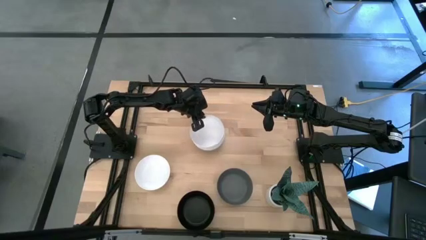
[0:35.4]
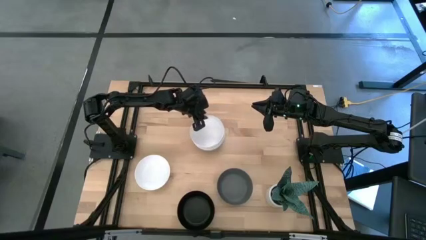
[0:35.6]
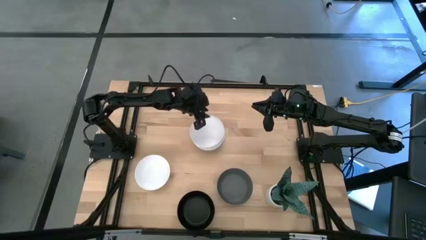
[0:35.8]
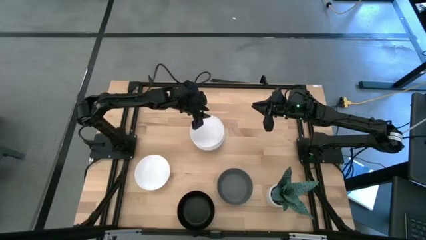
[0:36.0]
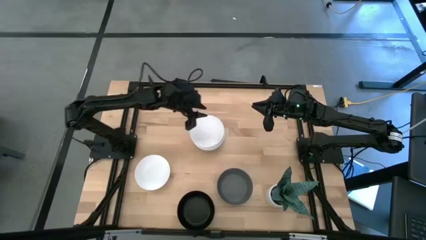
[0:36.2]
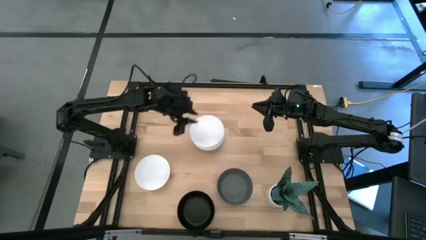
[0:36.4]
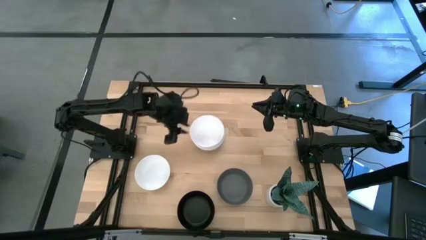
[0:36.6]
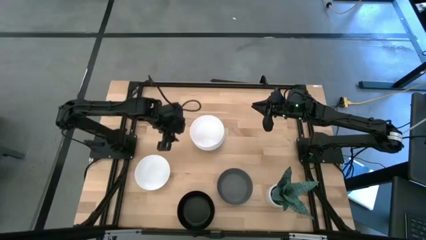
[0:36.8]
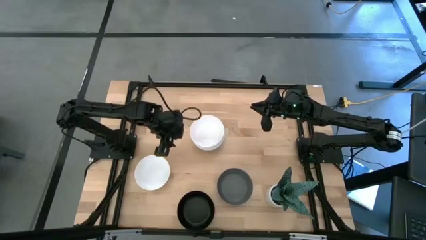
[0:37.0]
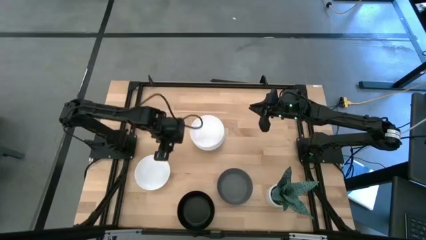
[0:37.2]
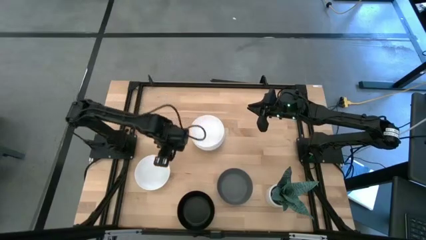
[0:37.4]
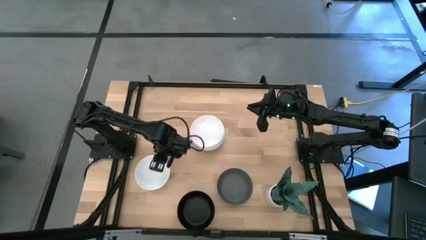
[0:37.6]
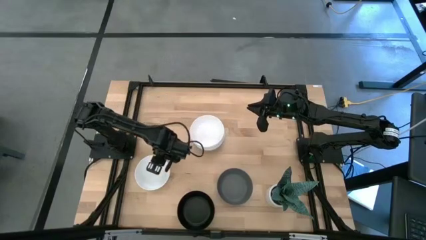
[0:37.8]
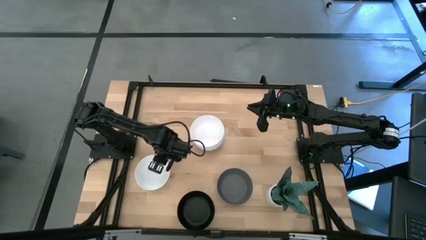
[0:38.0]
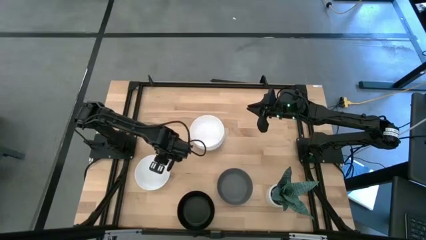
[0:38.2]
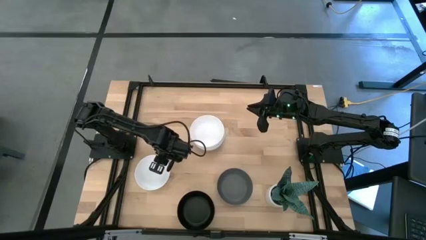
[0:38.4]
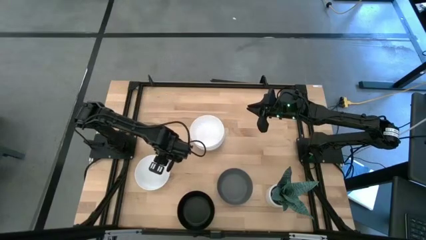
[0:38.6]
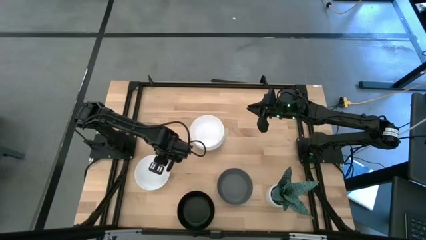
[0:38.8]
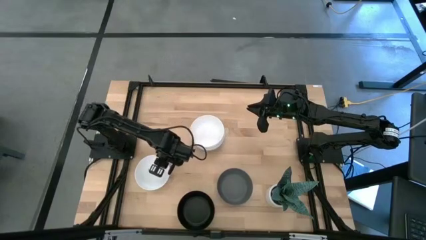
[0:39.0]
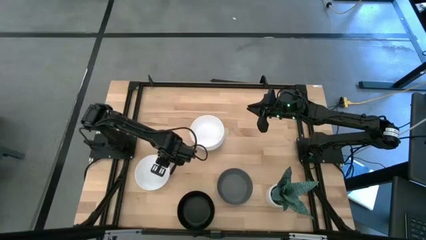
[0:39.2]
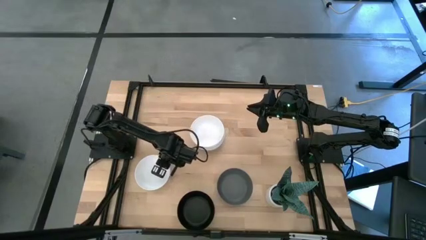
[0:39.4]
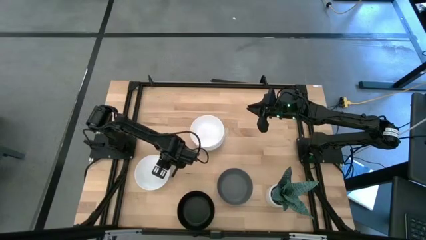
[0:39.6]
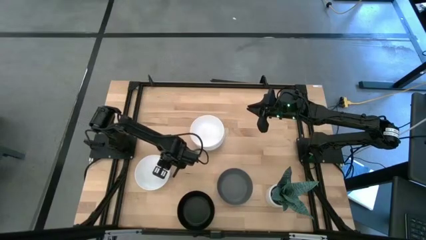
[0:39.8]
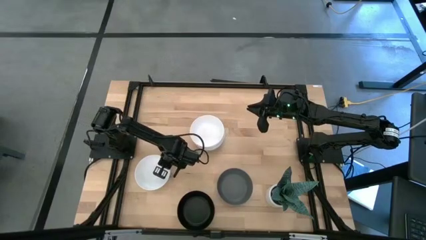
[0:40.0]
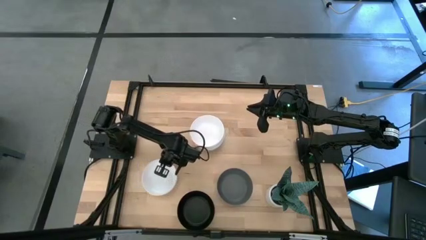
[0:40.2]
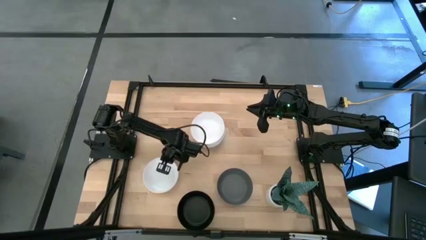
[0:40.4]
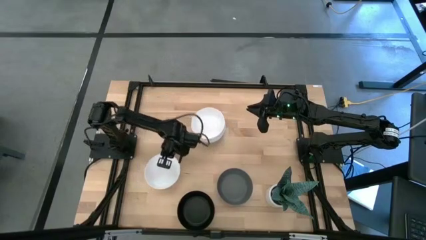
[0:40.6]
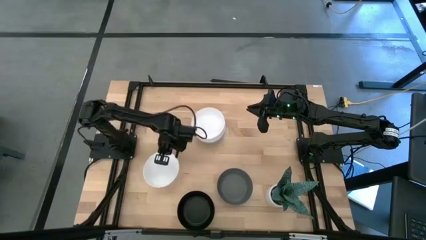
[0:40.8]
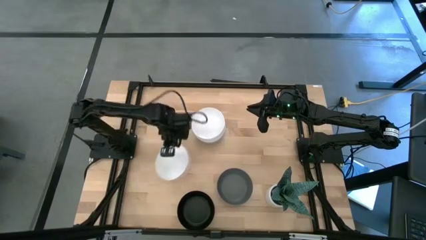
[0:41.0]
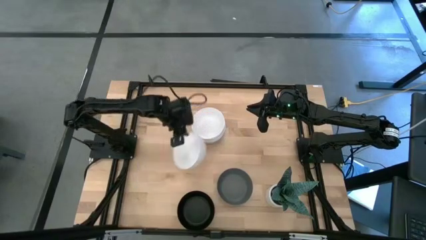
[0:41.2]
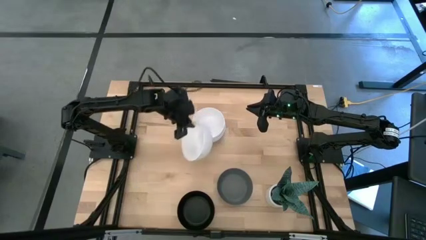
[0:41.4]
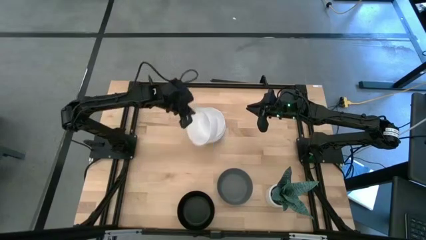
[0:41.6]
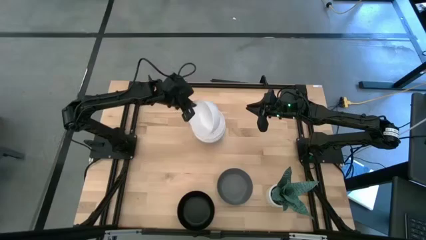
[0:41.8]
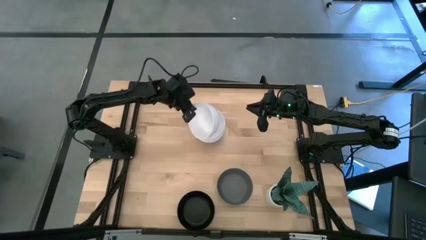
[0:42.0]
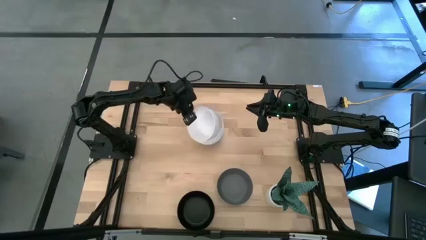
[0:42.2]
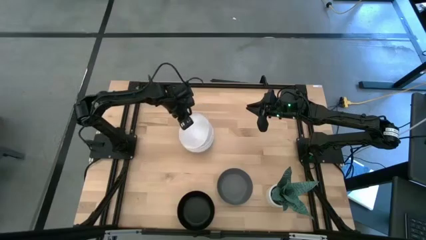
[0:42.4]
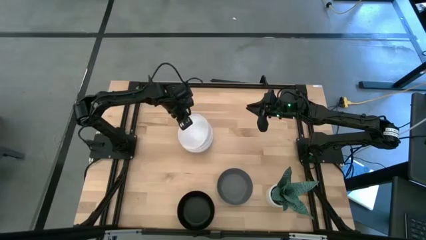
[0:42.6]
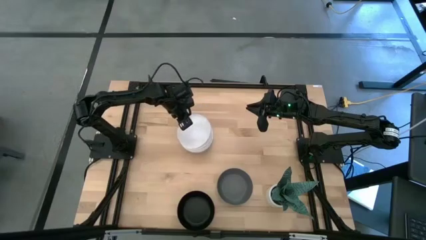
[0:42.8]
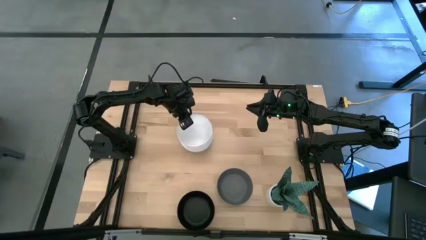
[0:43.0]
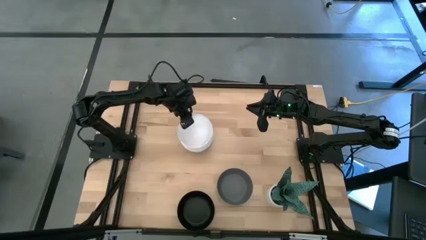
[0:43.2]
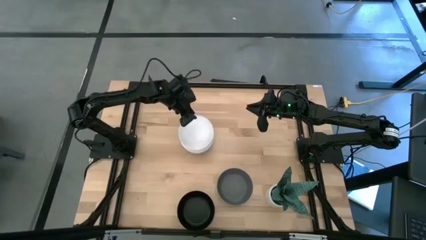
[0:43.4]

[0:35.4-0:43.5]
Task: Nest bowls inside each other
Stack the white bowl on the white bowl

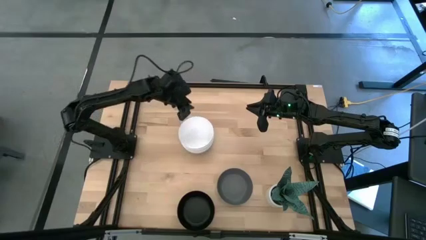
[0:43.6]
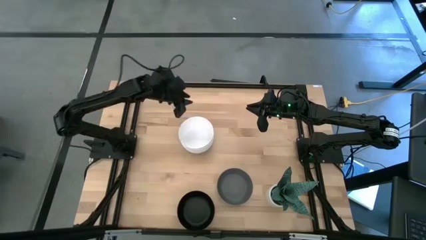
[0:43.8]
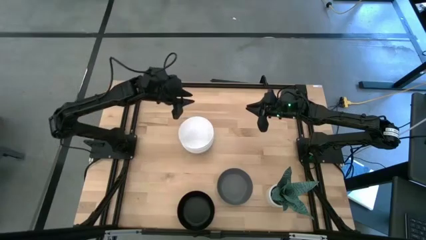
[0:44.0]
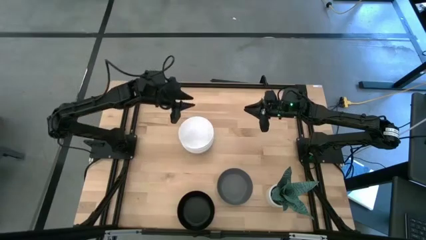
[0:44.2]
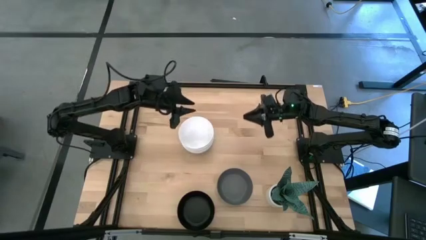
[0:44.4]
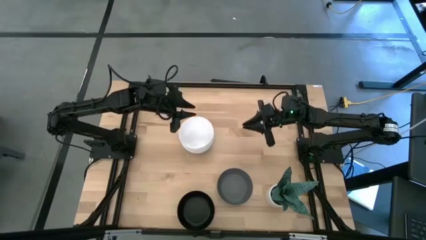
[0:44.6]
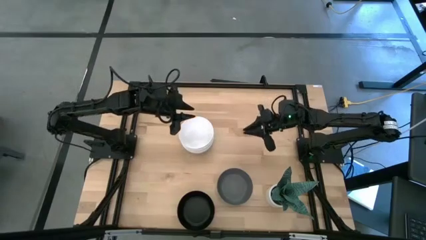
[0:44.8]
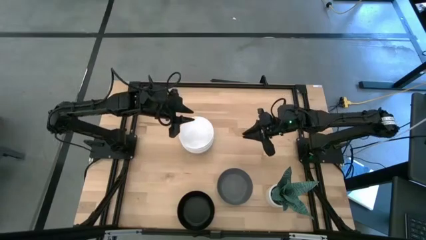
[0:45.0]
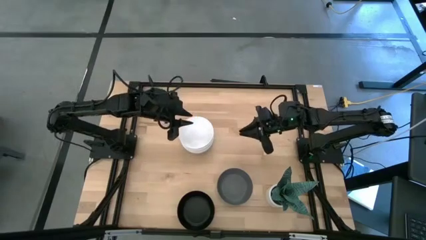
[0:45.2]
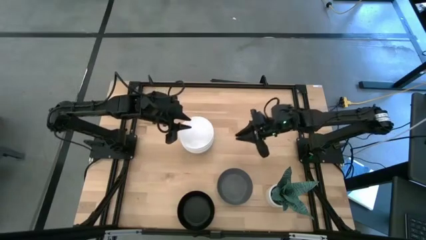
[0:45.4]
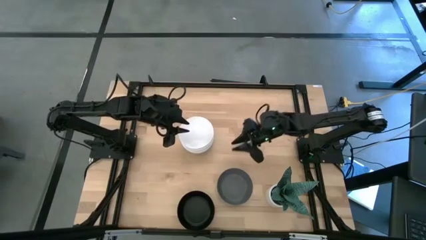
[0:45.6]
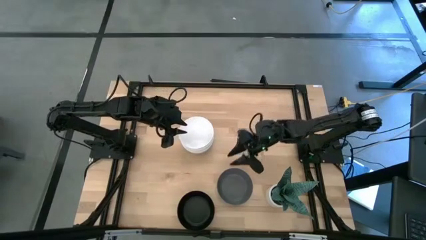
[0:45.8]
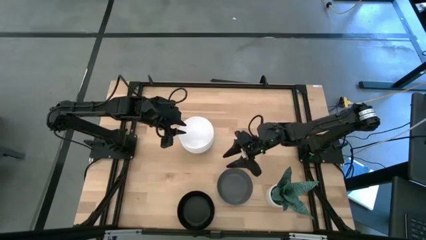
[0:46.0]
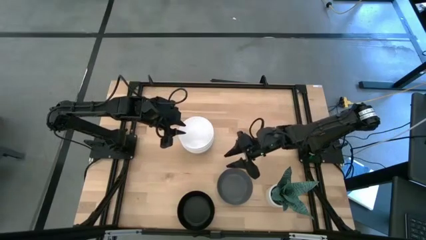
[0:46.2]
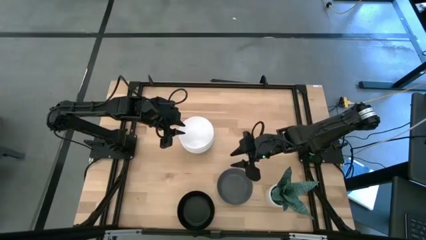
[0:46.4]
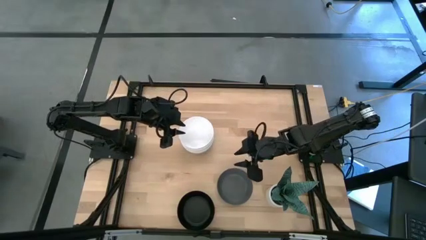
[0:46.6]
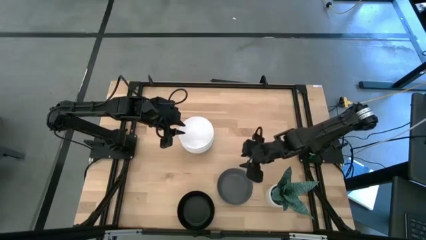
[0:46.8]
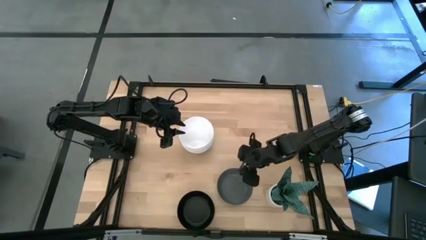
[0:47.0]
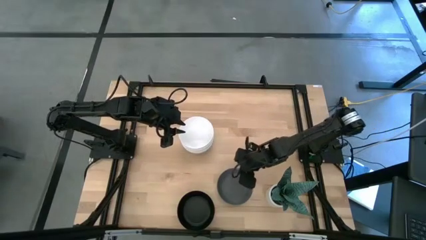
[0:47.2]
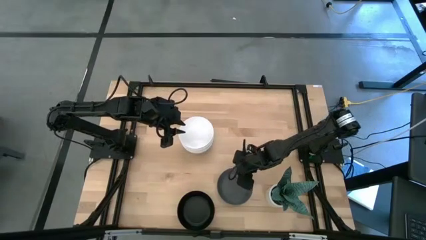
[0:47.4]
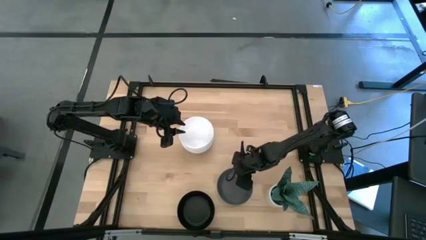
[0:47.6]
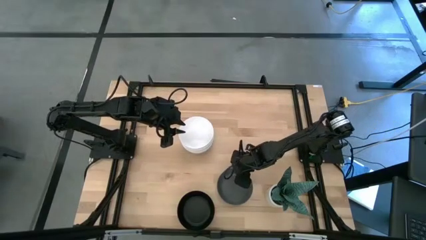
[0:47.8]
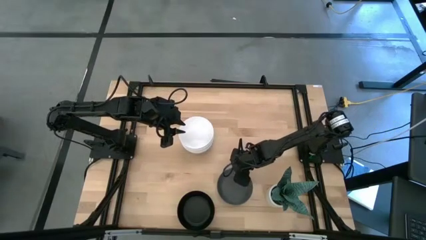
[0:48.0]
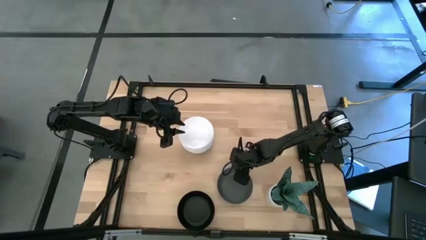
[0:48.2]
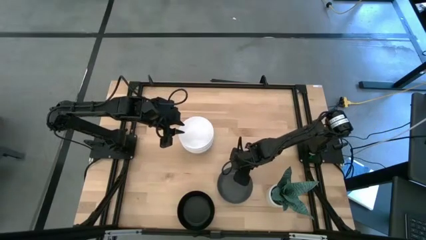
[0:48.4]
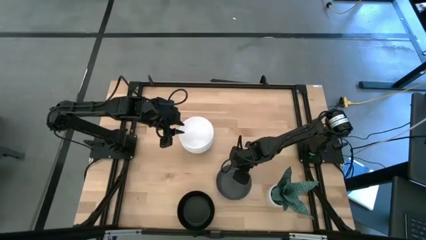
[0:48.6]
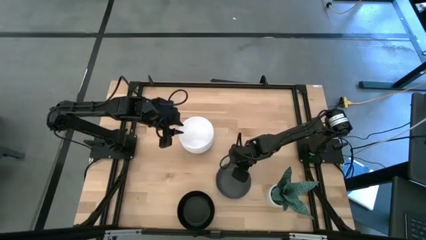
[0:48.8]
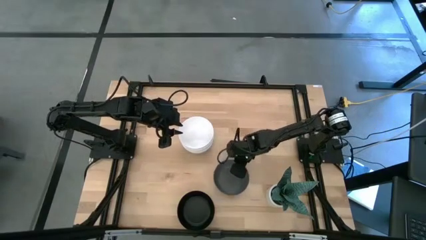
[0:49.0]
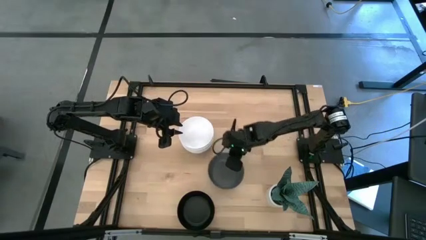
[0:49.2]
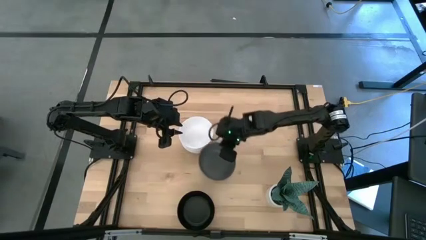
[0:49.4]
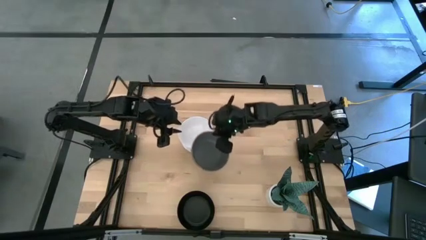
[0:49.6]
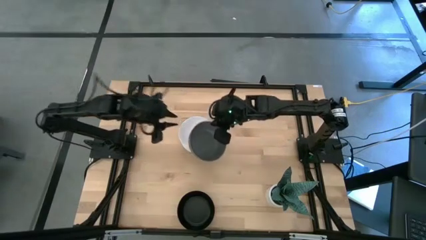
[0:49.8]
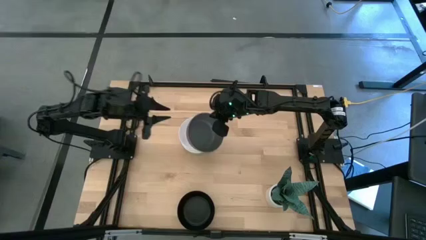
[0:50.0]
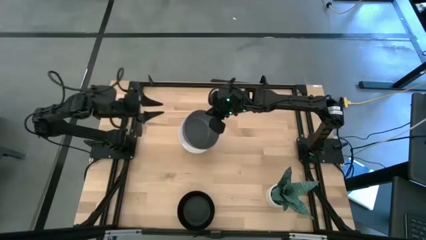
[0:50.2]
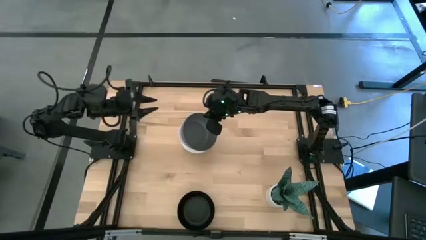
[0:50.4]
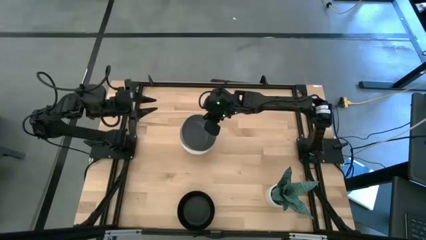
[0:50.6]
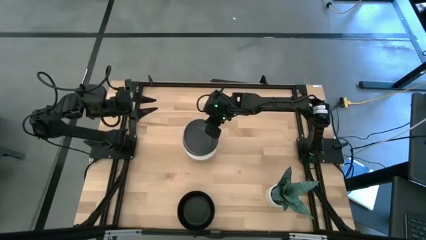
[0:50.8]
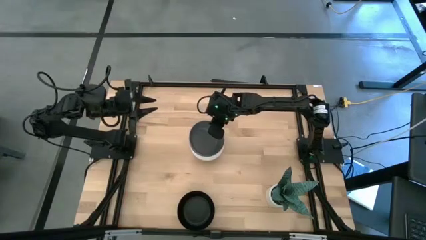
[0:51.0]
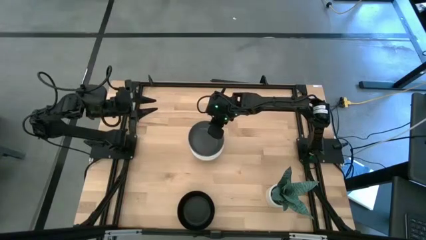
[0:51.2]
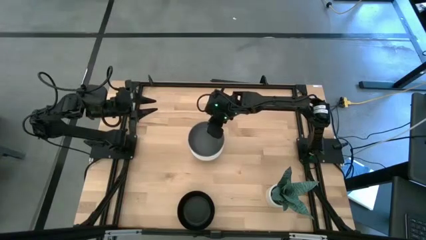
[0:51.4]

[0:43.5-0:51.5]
Stack the gray bowl on the white bowl

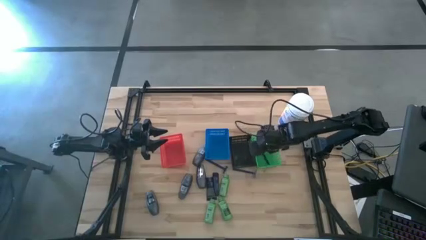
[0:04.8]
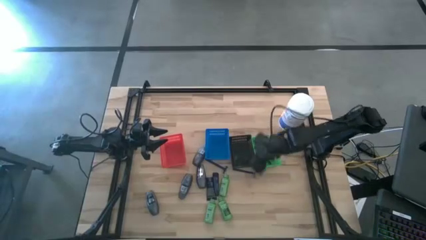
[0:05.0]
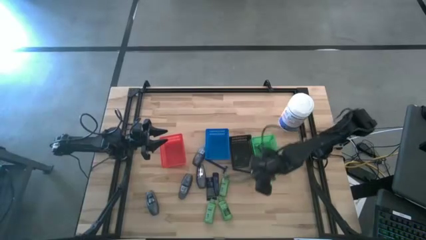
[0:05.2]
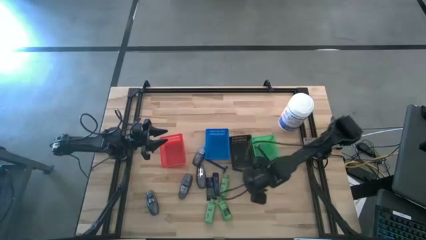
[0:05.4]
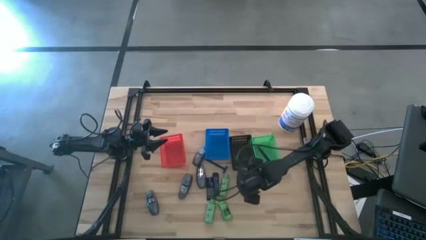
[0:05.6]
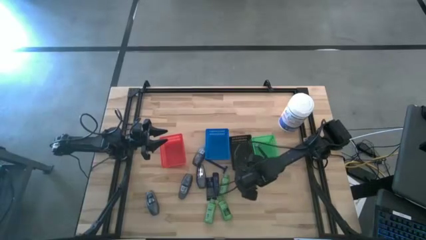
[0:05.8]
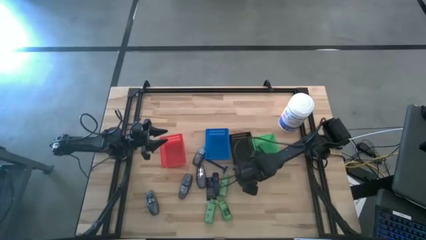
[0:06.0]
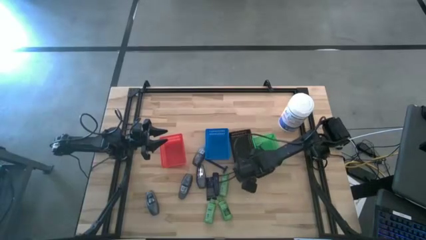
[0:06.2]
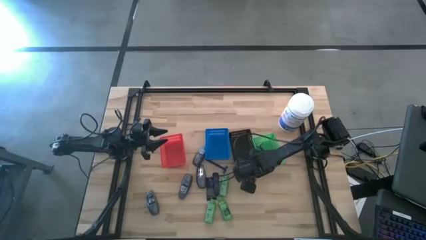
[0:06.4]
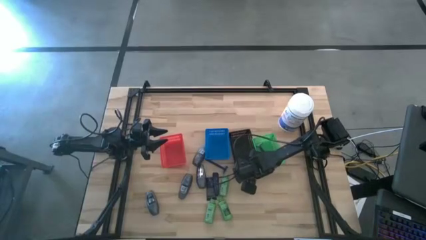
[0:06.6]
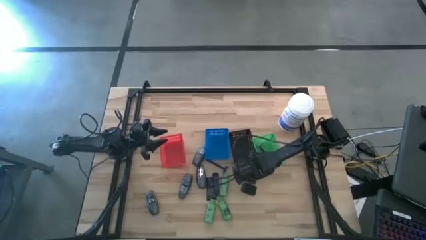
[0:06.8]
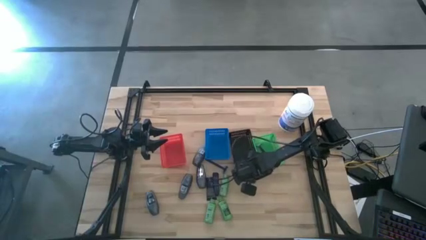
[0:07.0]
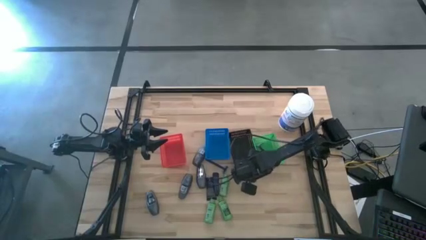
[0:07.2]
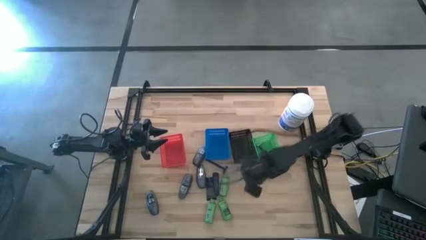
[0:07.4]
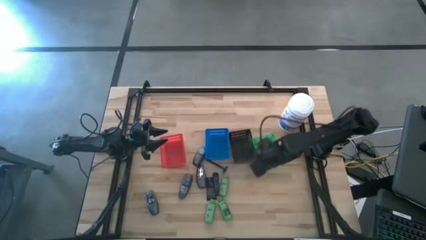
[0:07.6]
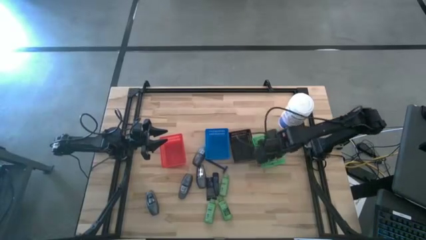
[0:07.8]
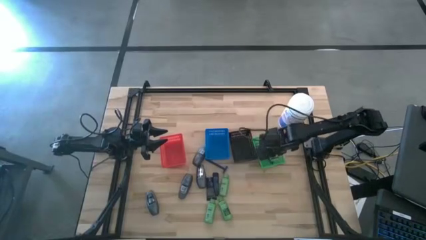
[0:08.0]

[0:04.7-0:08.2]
Task: Pick & Place Travel size toiletries
Put the blue razor into the green bin
